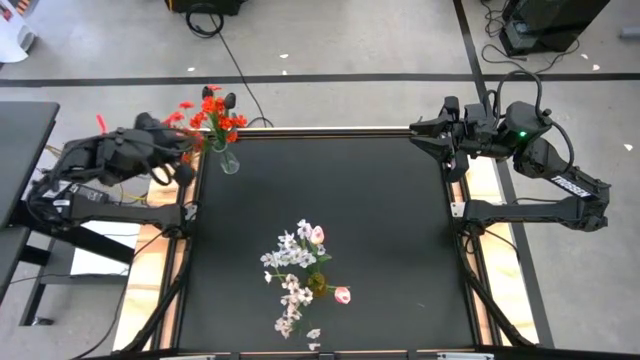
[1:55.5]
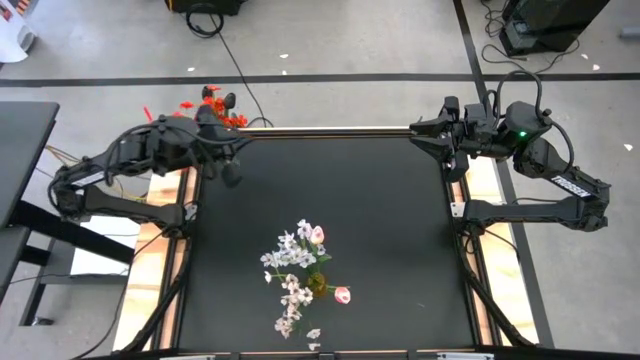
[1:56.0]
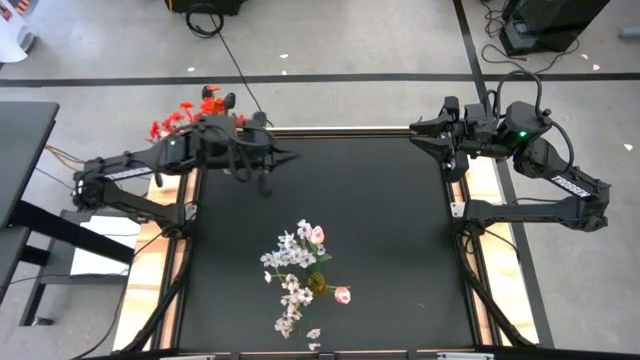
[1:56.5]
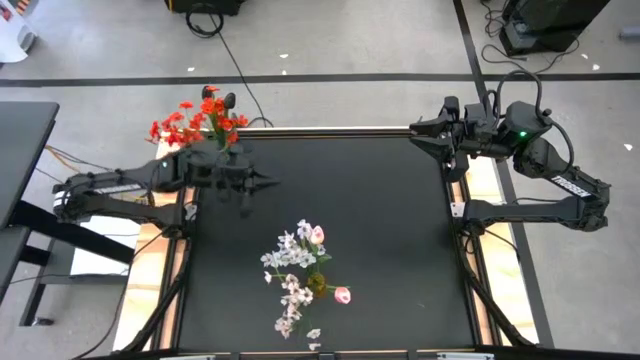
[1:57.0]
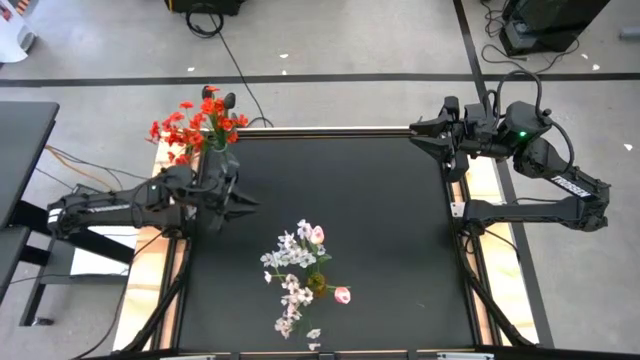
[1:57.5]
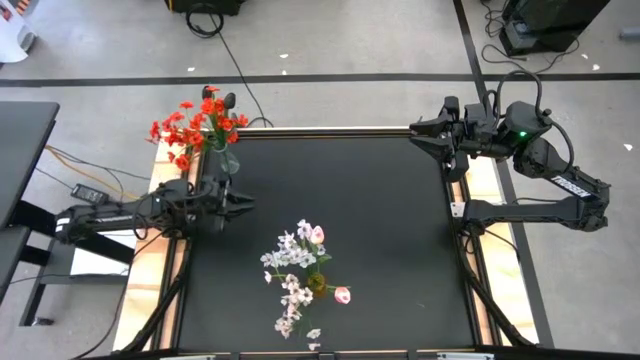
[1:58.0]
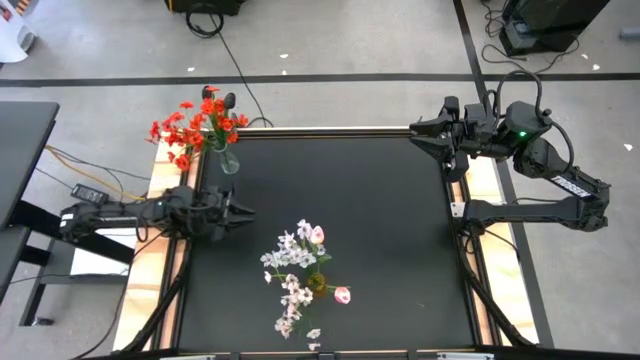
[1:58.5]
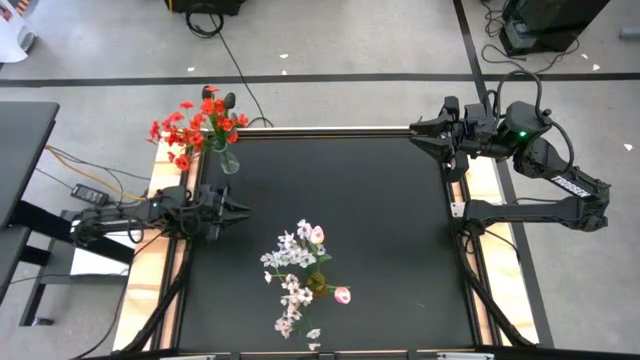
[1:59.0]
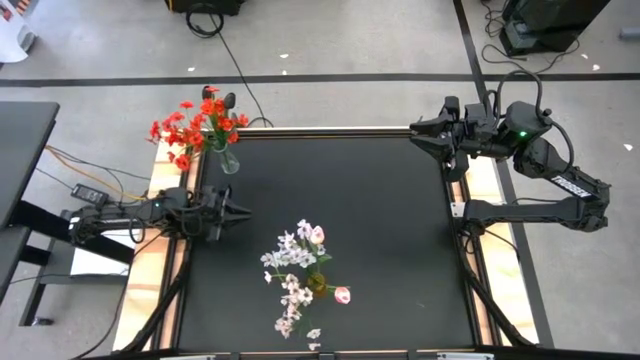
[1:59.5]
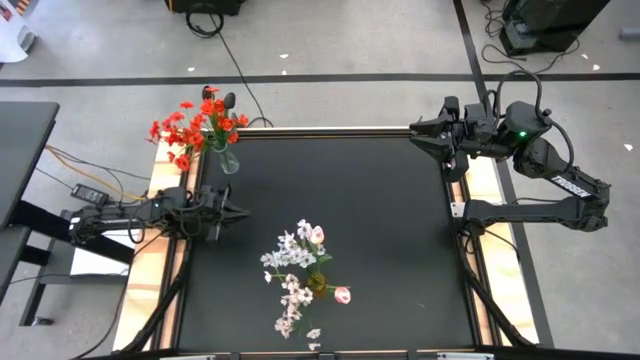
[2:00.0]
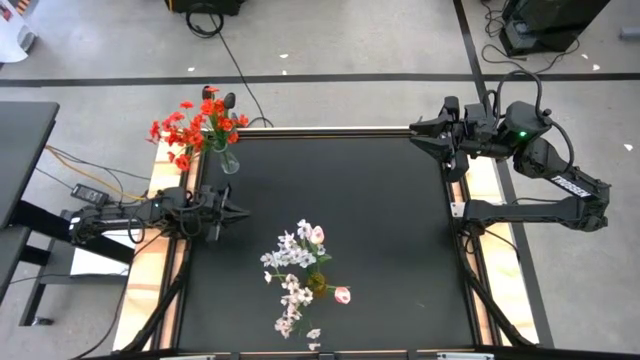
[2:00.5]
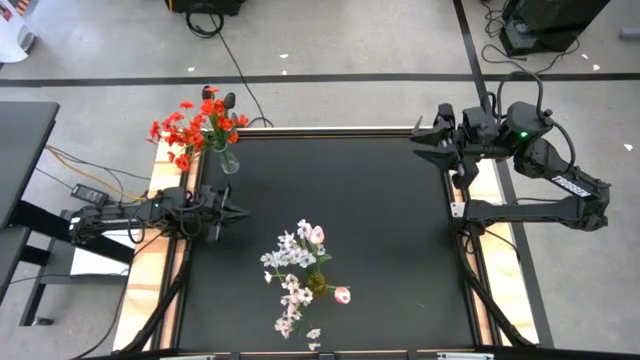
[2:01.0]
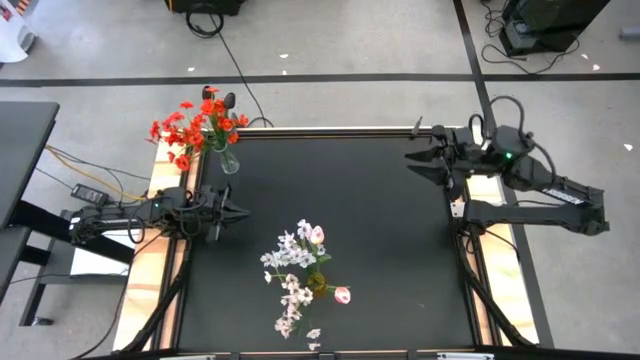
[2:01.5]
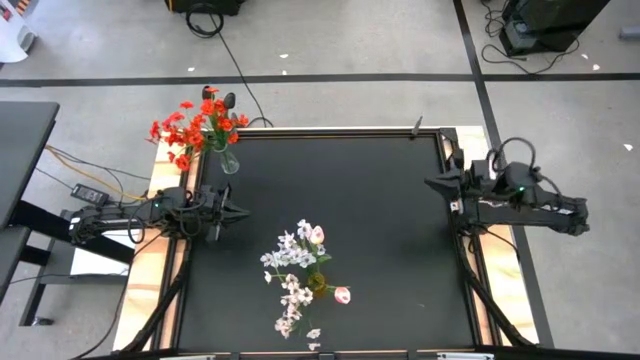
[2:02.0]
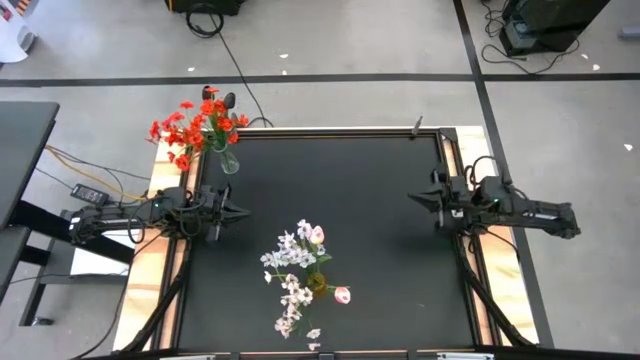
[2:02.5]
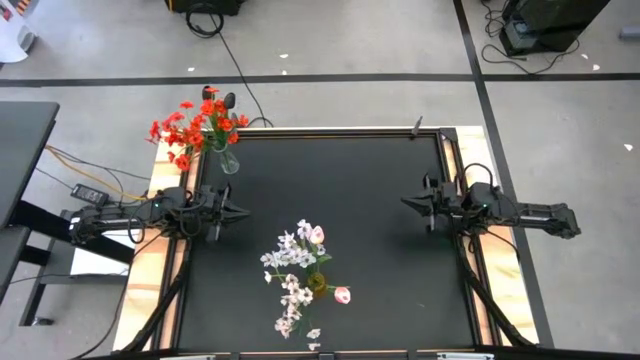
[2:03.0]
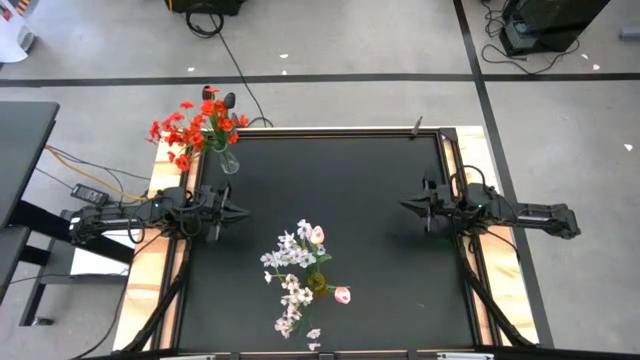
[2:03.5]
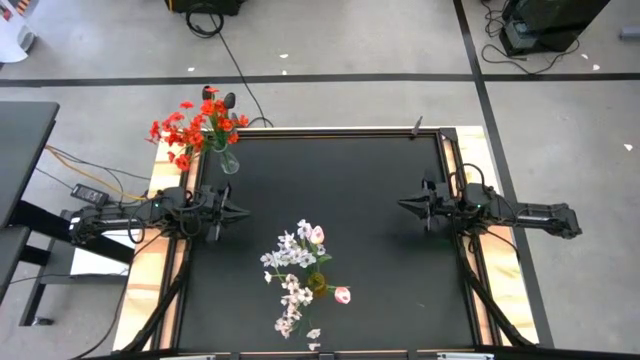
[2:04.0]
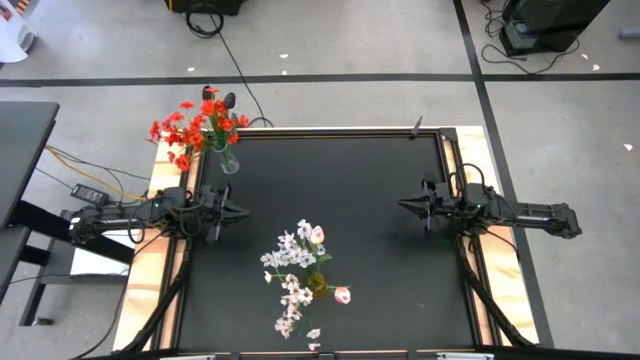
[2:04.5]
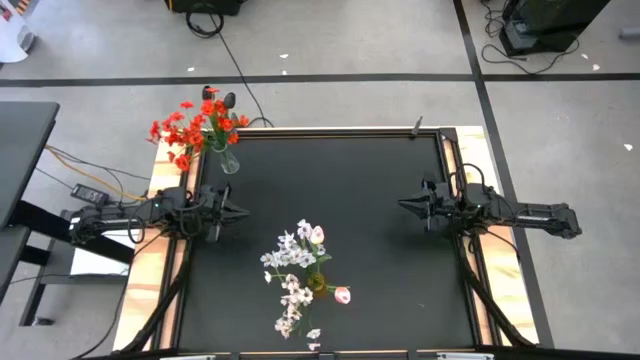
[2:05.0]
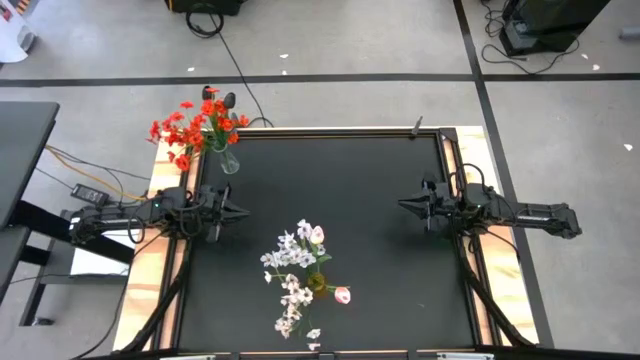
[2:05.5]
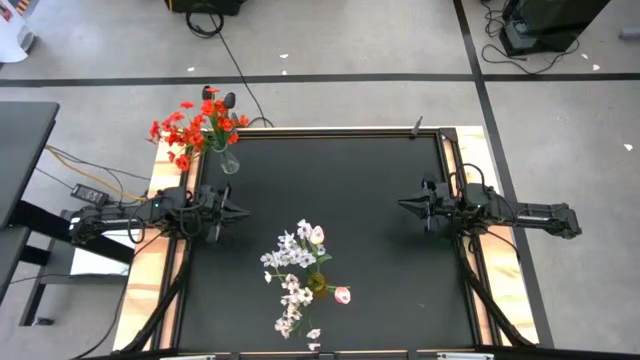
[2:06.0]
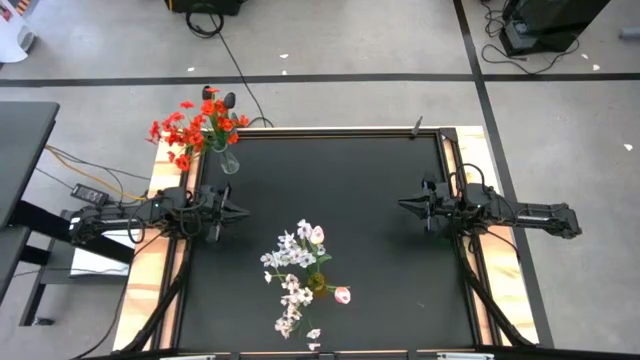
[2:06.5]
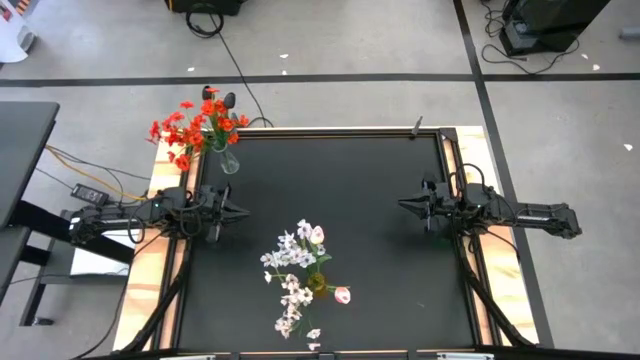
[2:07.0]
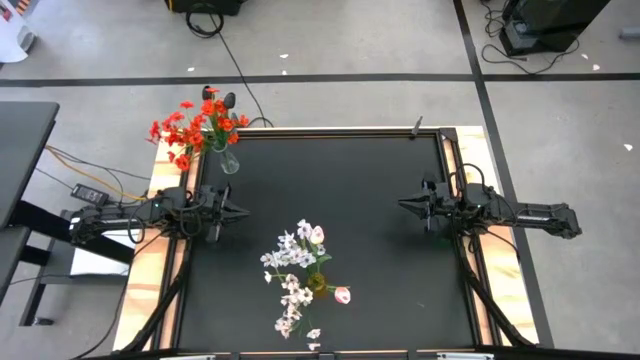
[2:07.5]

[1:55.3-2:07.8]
Task: Sort flowers into vase by color
Return to Home Position

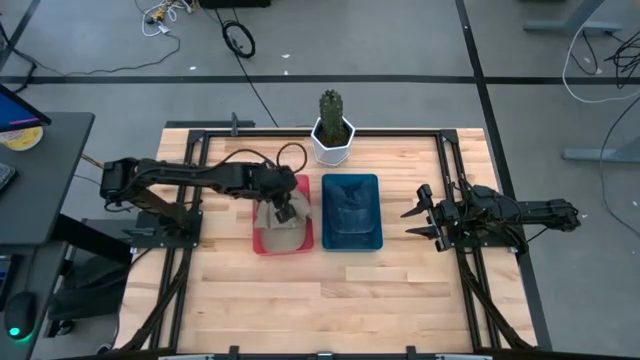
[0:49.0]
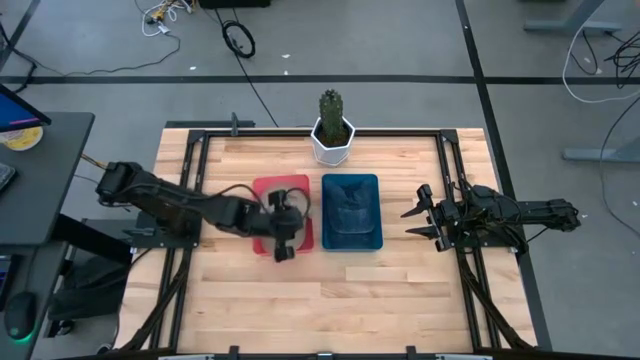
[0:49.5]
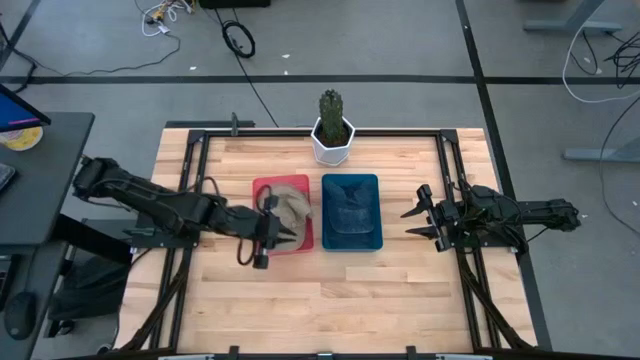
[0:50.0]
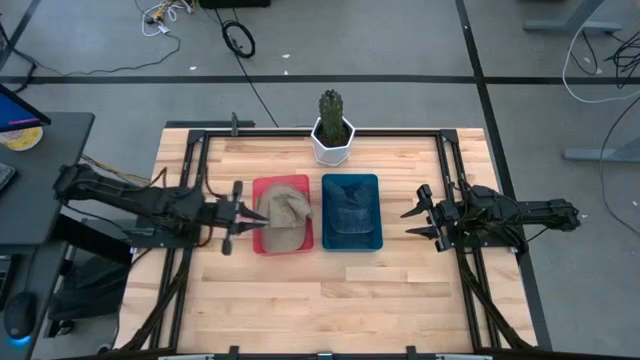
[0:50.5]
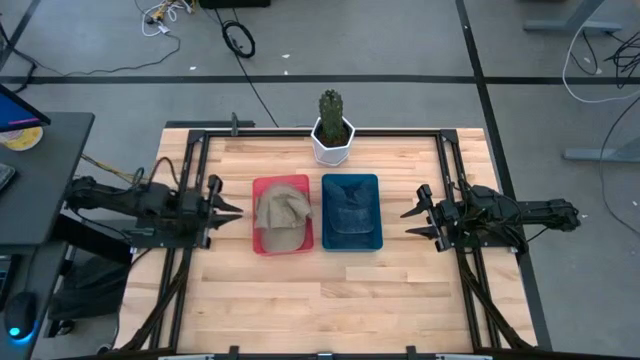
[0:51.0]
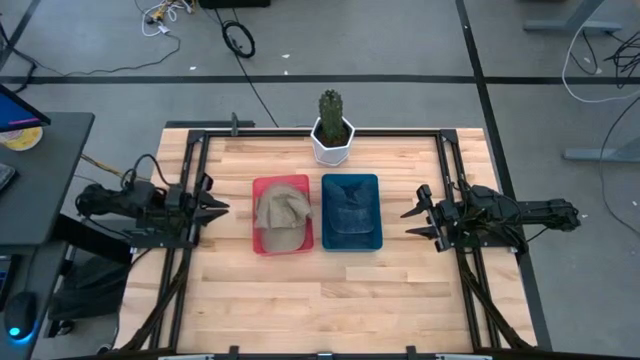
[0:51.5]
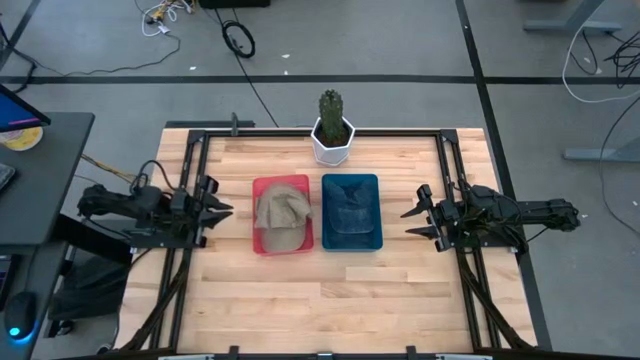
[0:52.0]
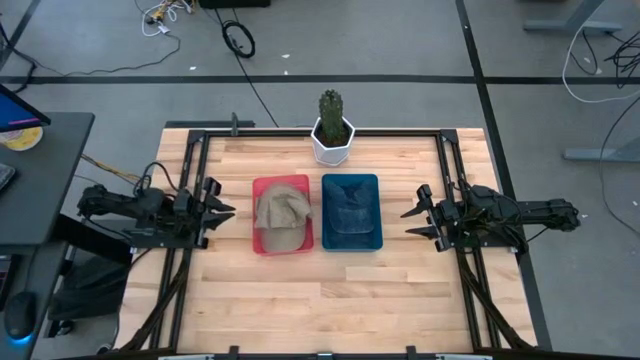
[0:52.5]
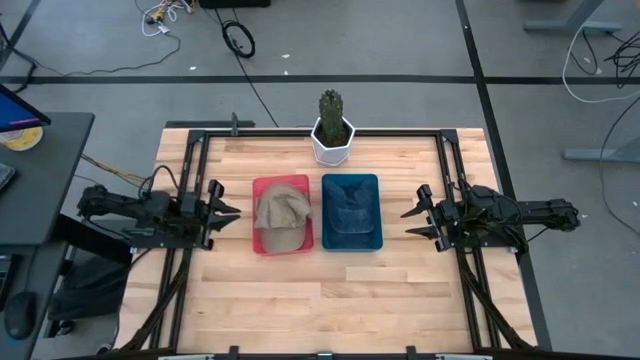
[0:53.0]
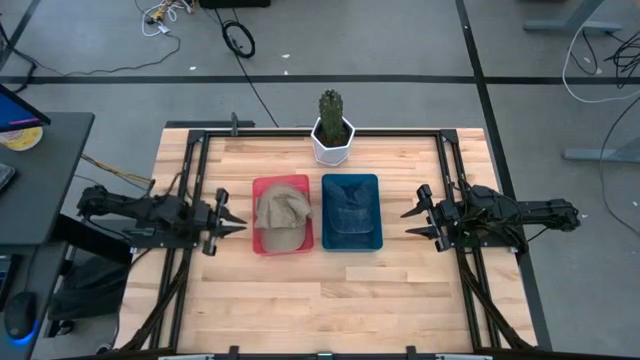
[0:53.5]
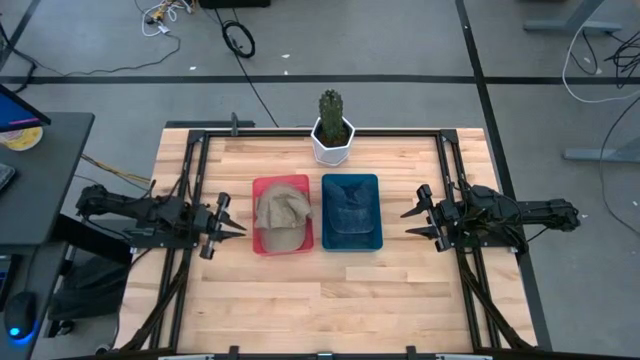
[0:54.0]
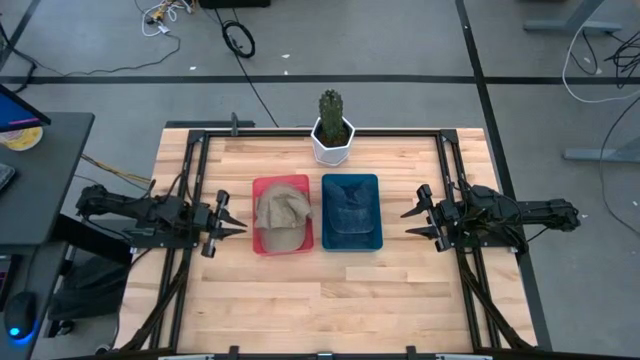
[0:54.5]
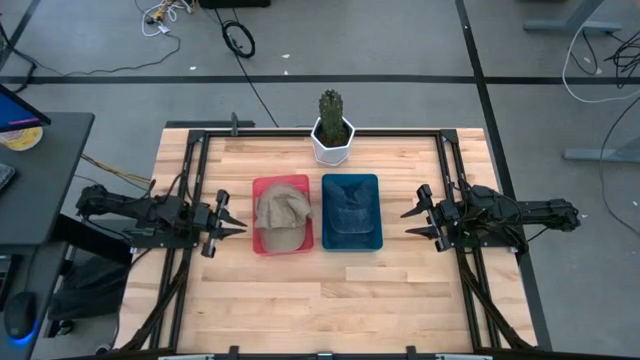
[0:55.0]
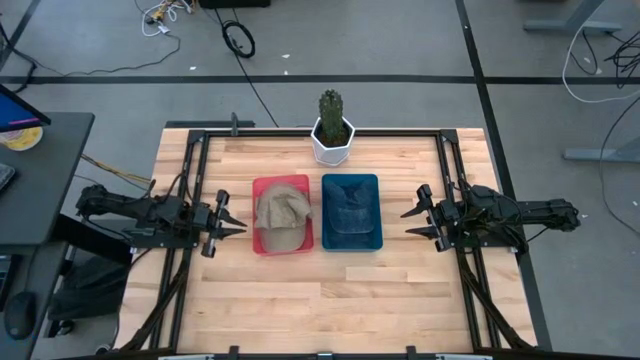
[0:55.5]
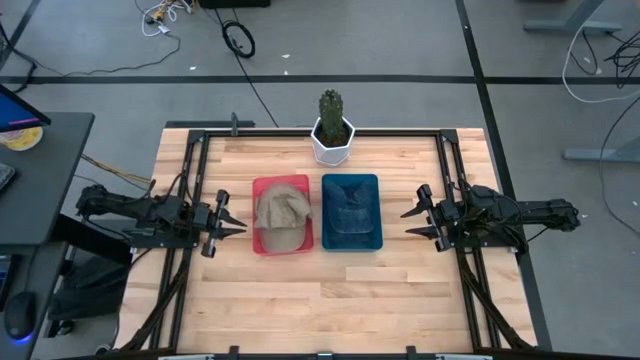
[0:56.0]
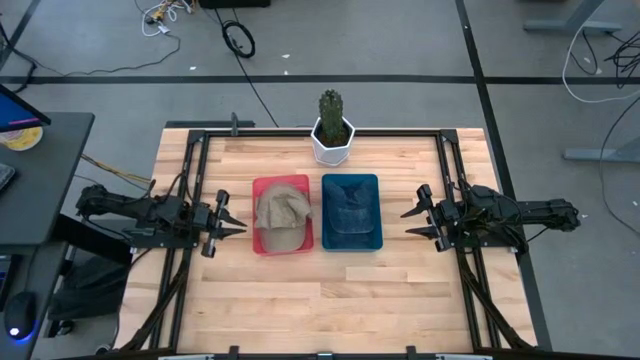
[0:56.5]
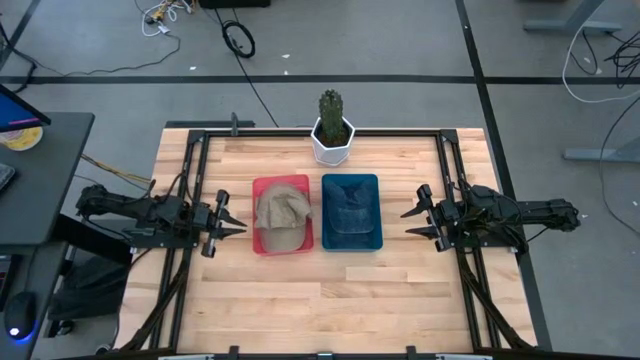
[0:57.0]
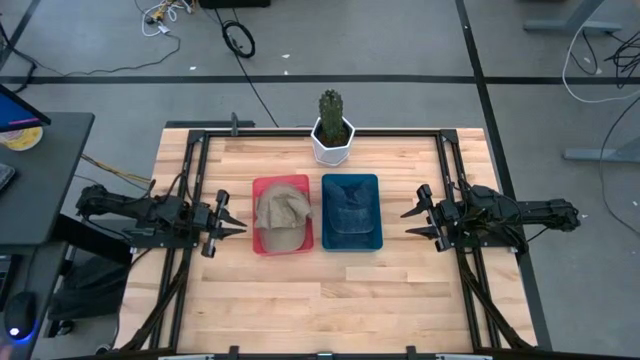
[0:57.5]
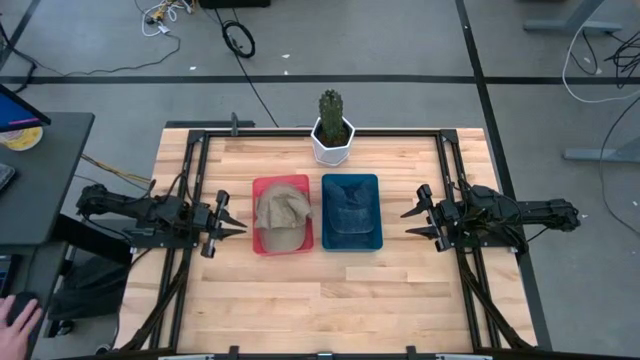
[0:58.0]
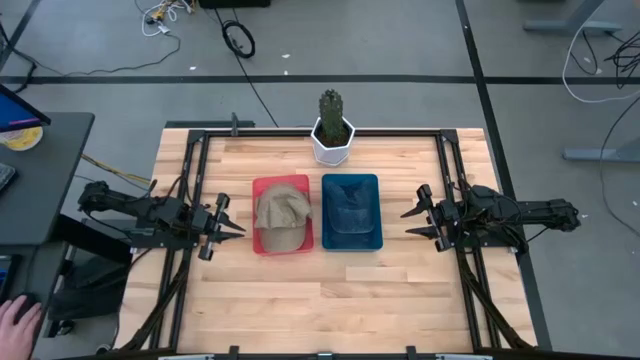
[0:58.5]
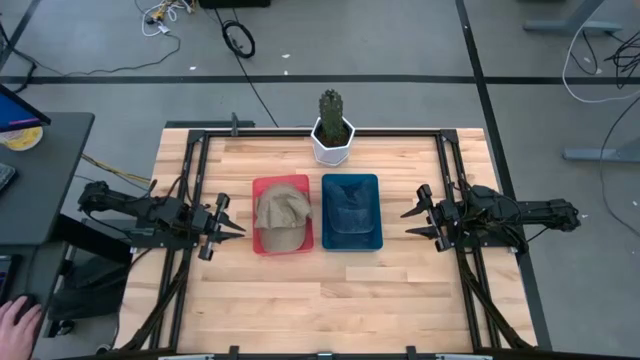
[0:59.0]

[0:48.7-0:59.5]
Task: Pick & Place hat
Return to Home Position
